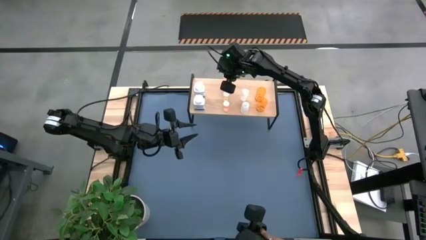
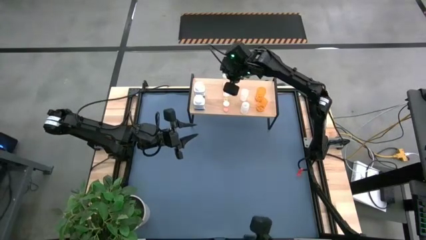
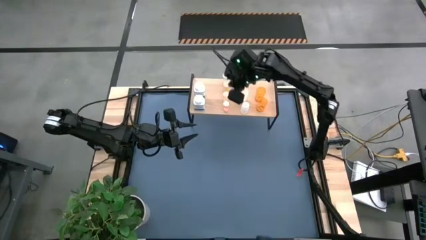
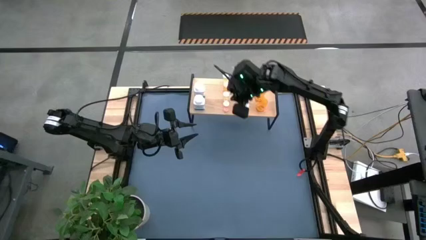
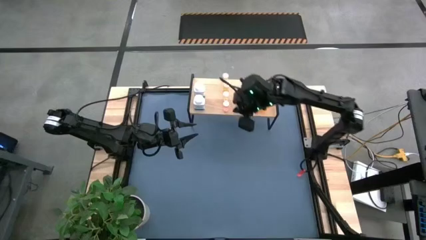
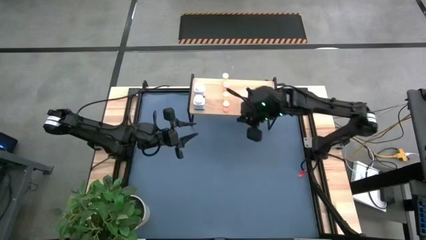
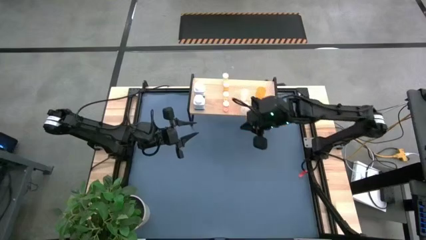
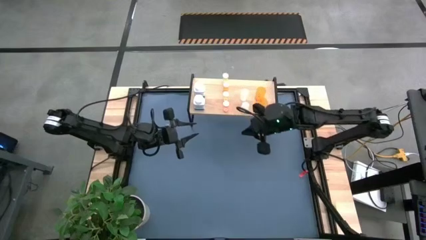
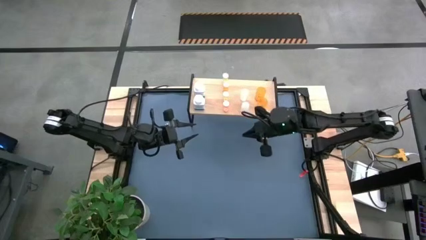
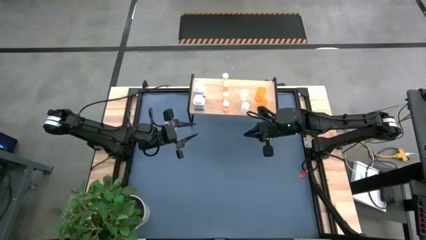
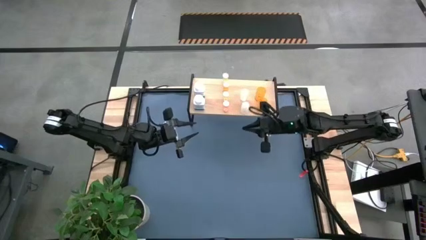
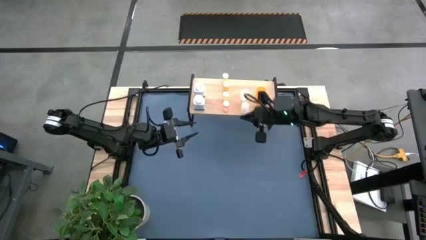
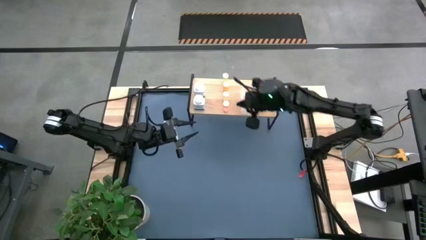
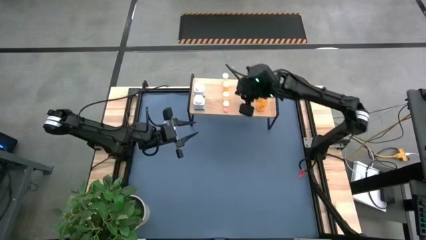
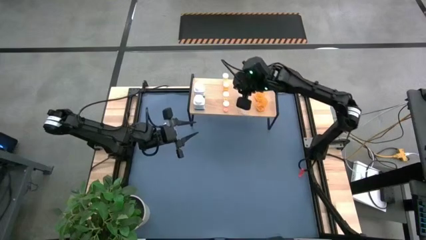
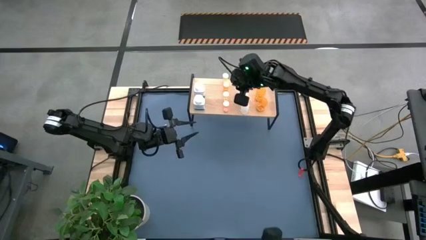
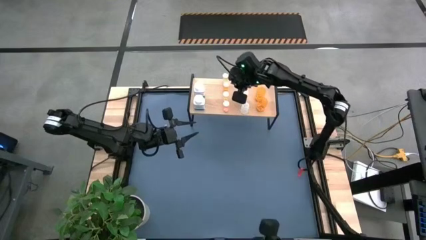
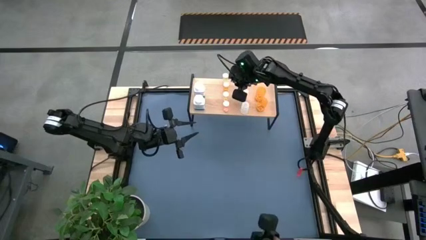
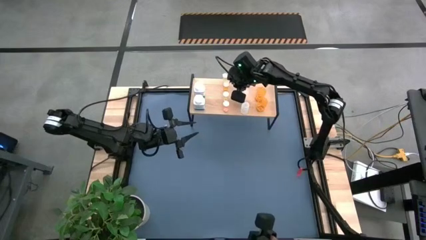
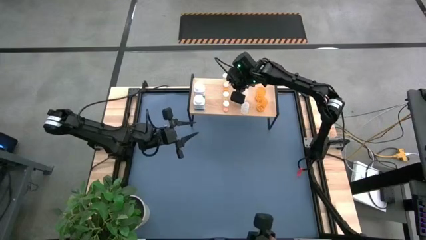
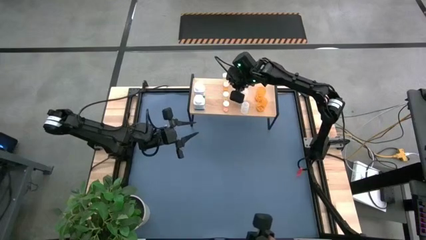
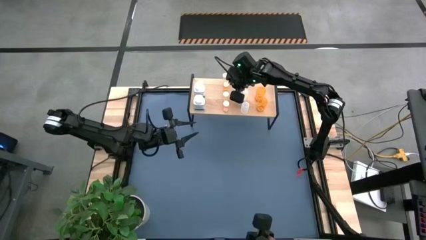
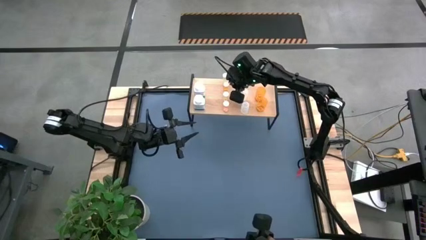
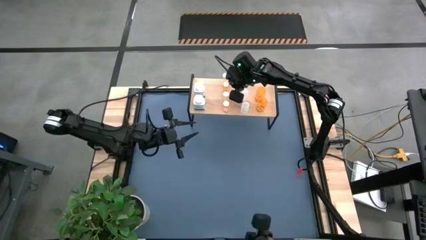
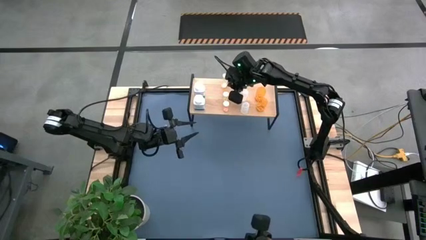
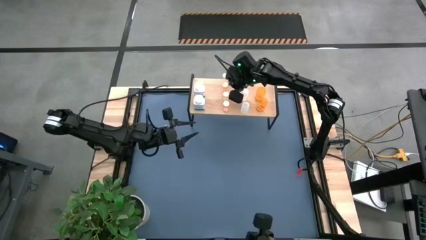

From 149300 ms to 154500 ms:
Task: Pick and place medicine bottles onto shelf by color
Adjust the orange pill bottle on the shelf

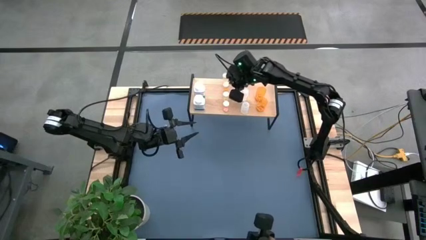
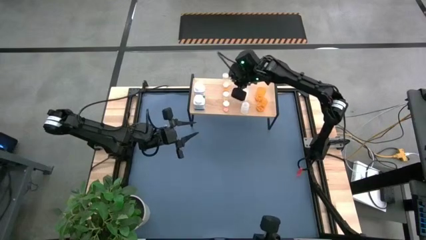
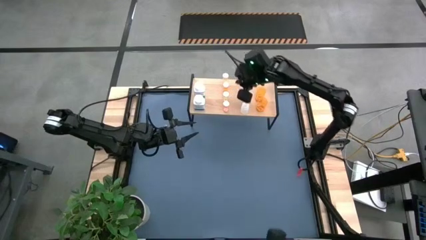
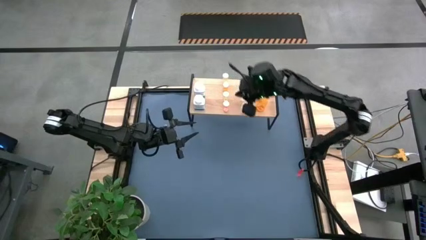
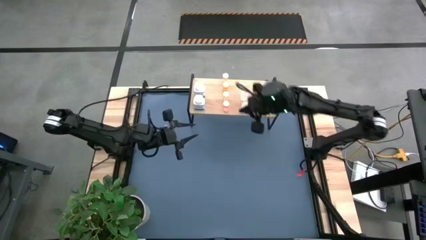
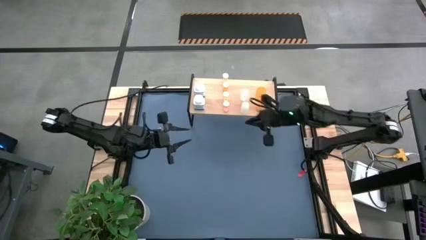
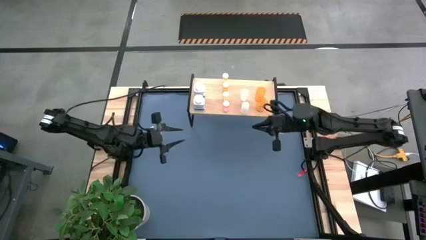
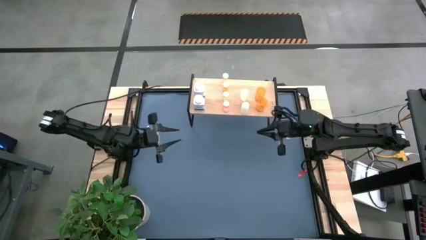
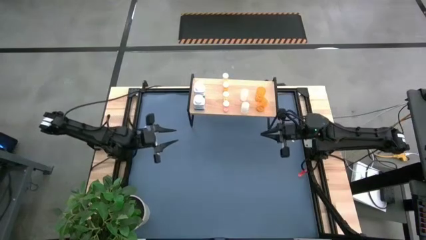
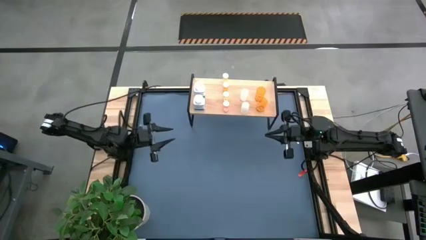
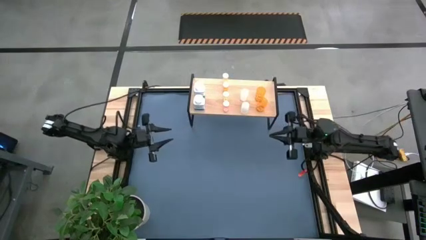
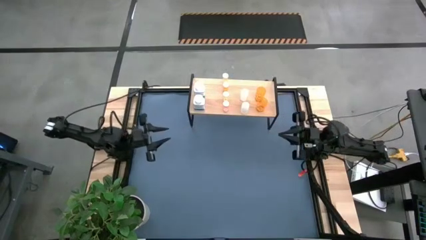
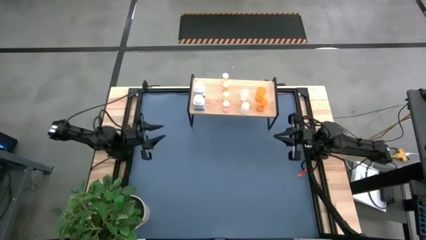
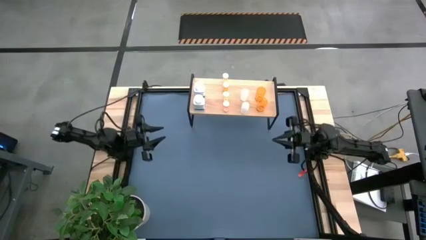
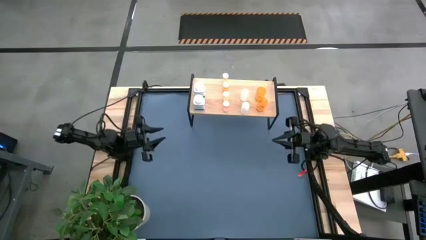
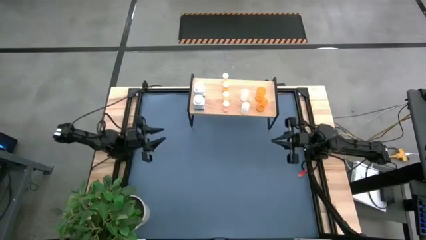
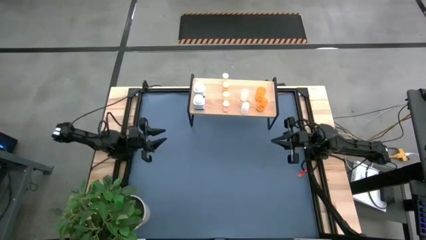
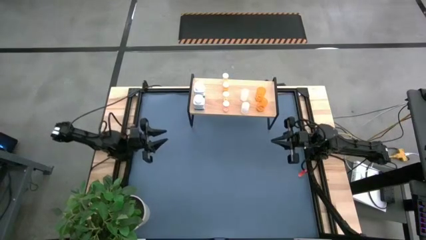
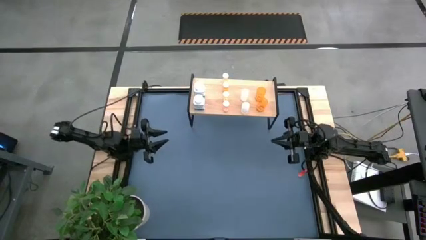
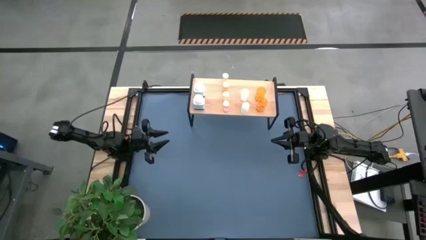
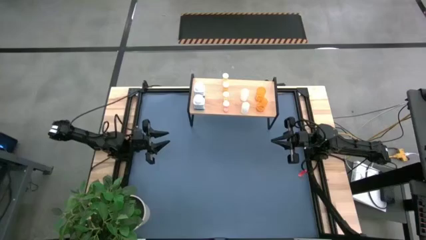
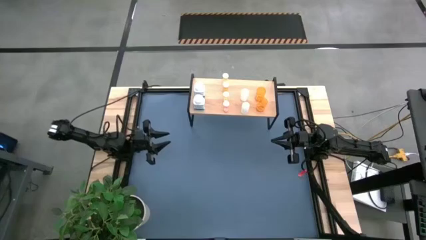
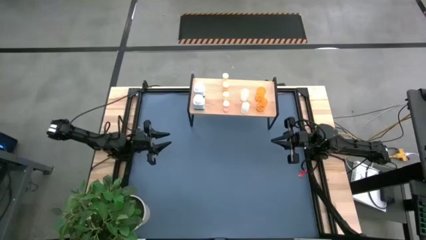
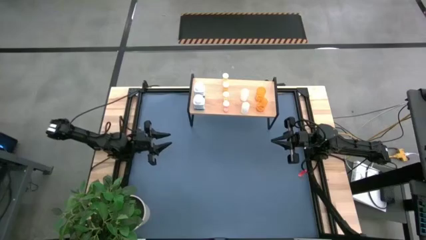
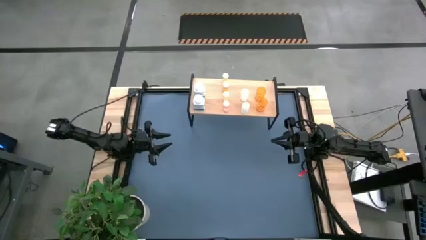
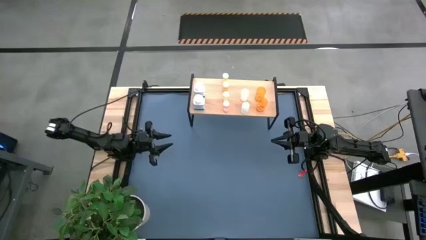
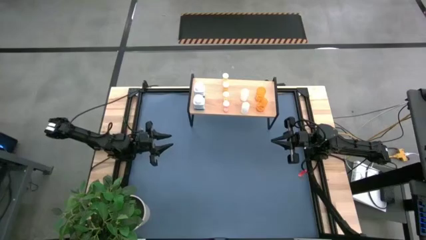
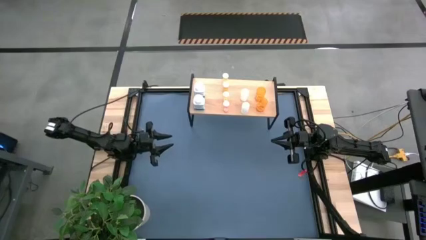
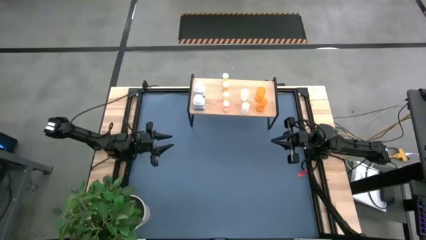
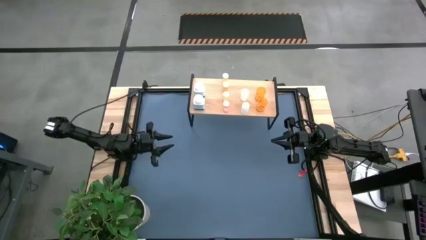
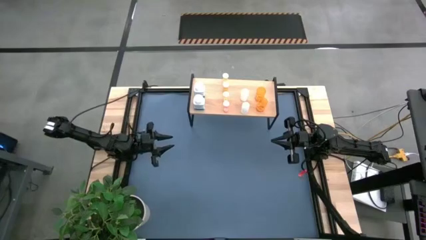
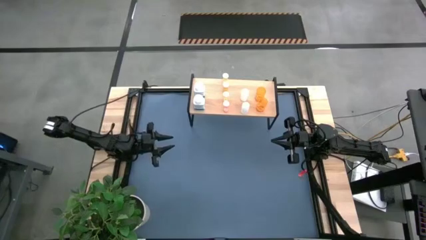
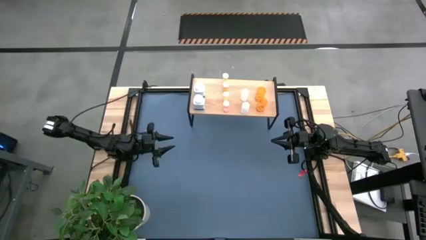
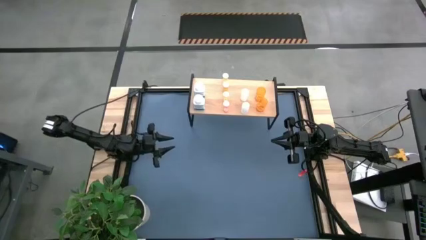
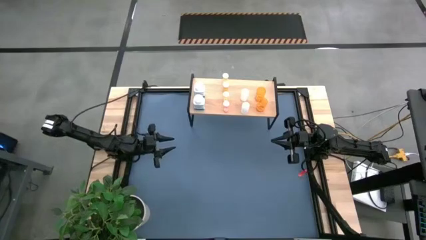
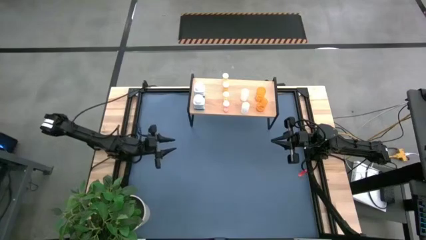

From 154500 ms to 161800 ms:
Return to Home Position

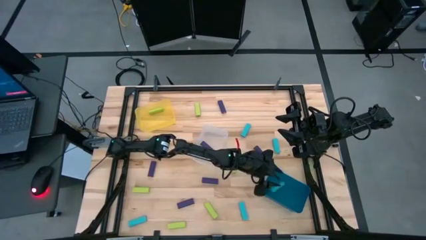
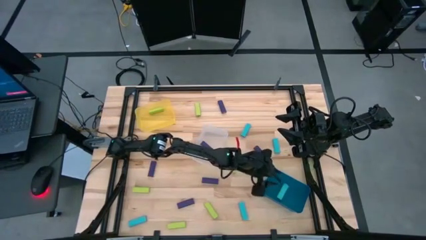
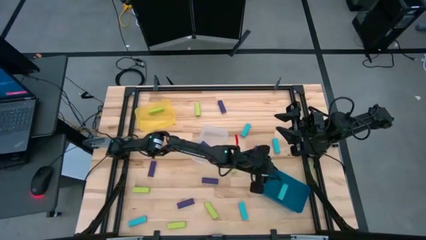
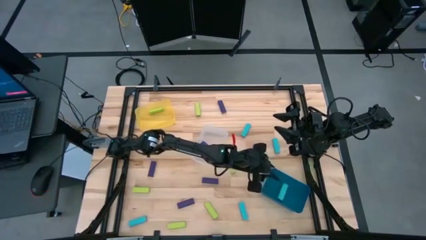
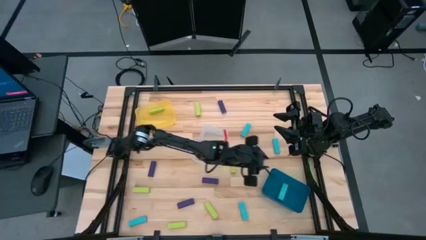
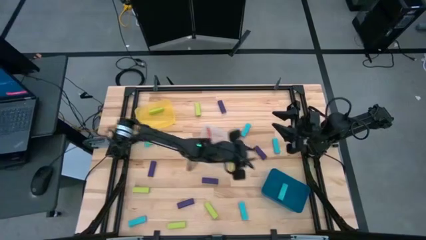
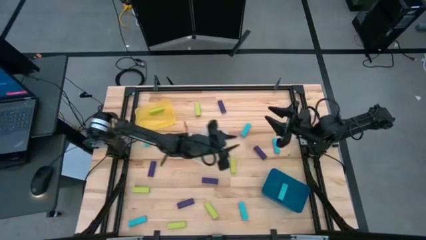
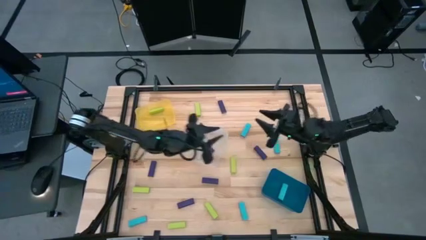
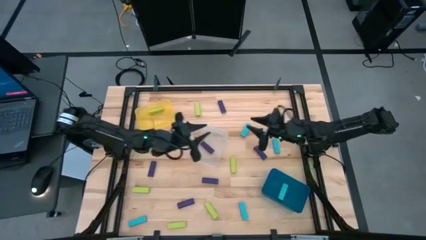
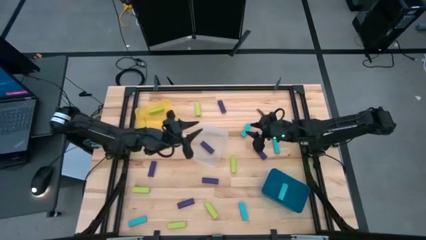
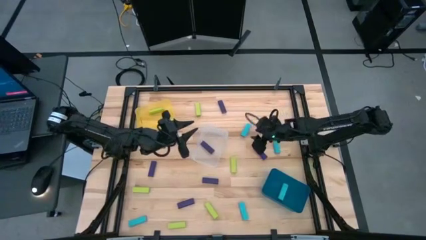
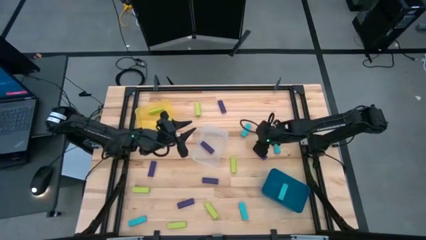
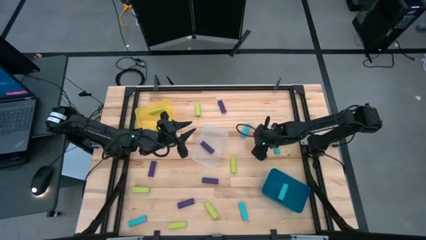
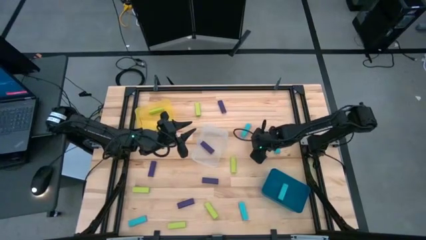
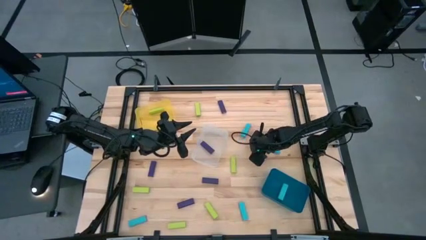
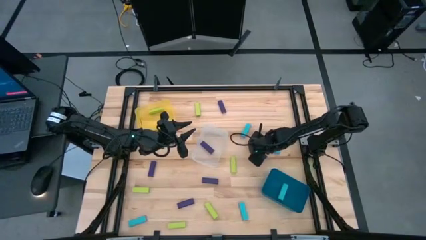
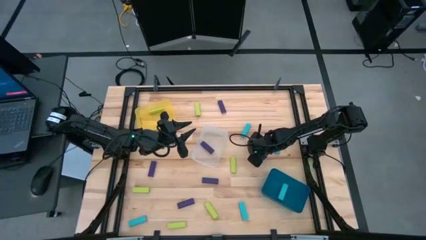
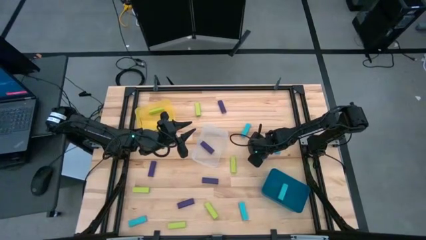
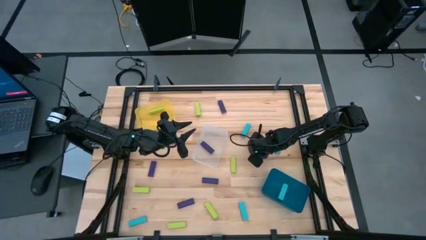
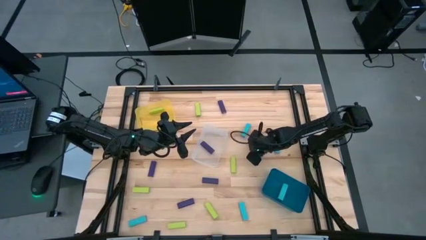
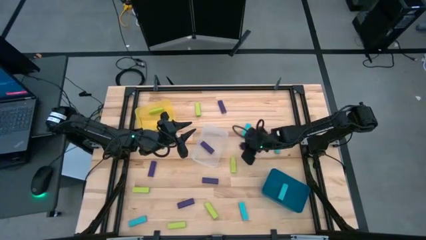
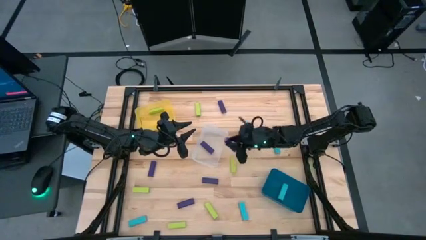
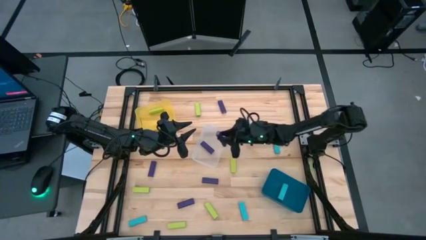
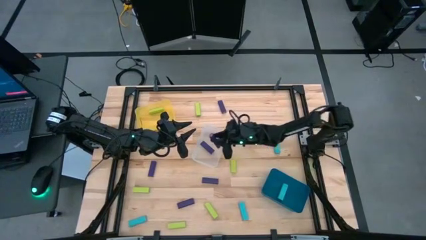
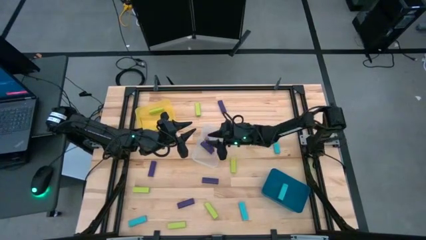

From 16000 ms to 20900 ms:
Task: Sort blocks
Put the violet block into the transparent bin
